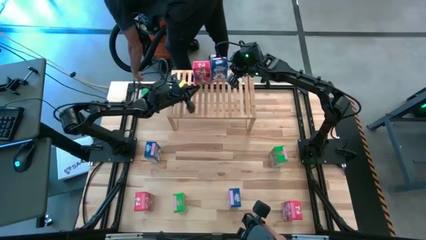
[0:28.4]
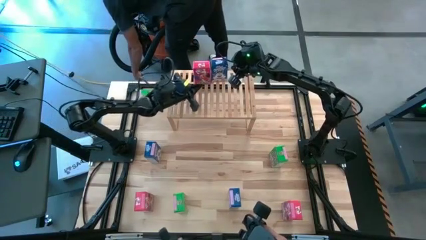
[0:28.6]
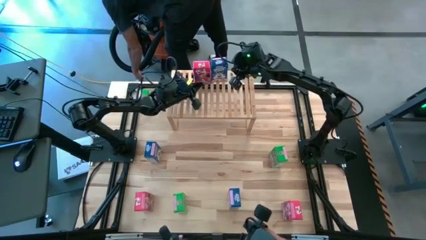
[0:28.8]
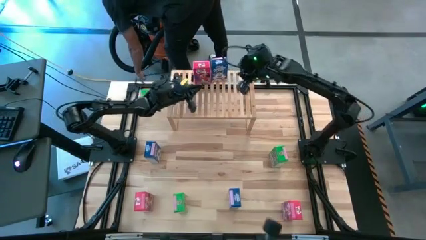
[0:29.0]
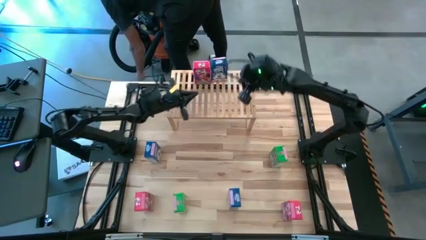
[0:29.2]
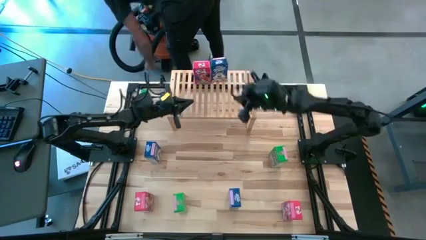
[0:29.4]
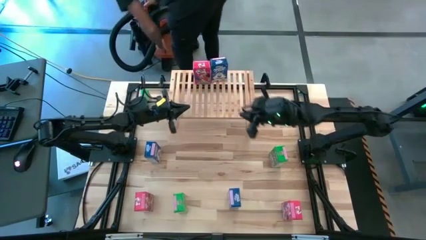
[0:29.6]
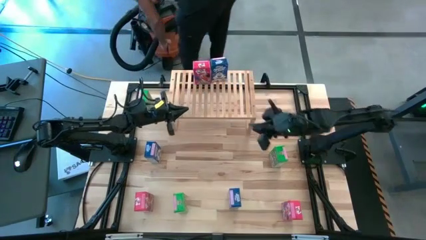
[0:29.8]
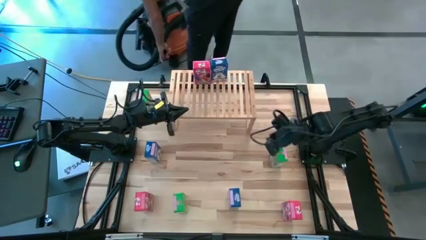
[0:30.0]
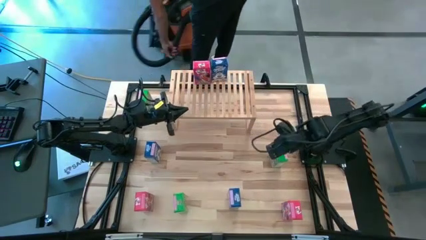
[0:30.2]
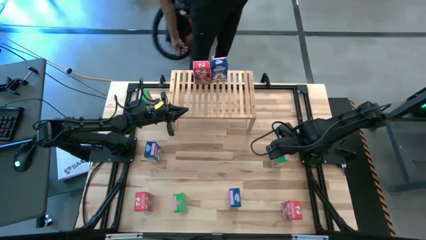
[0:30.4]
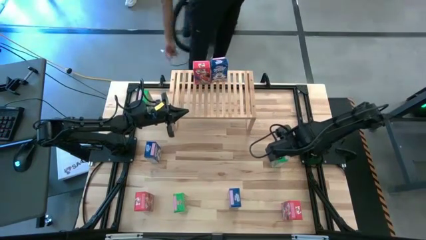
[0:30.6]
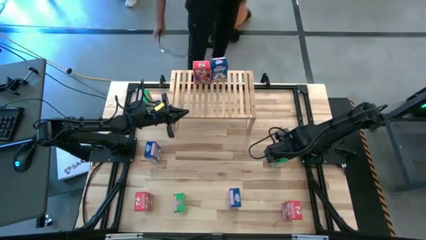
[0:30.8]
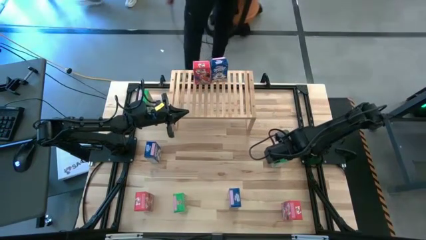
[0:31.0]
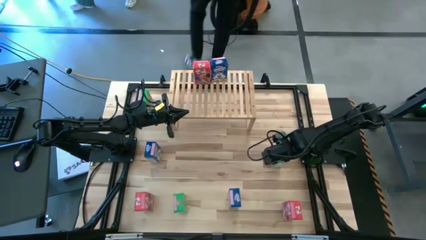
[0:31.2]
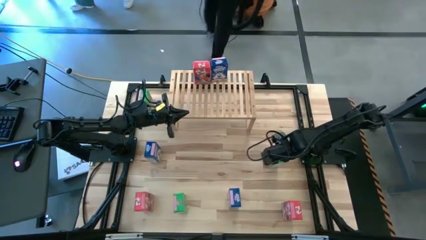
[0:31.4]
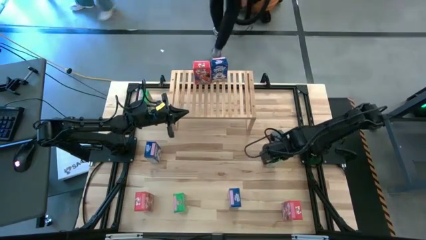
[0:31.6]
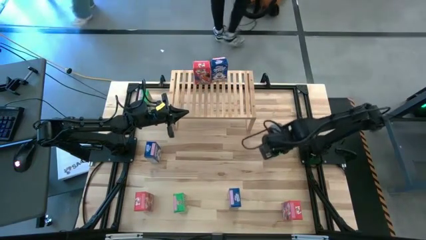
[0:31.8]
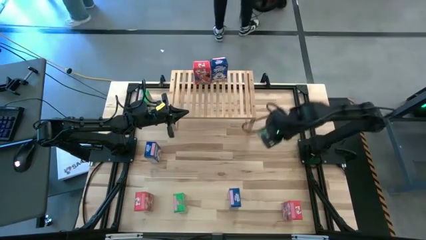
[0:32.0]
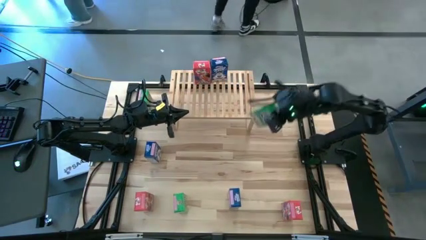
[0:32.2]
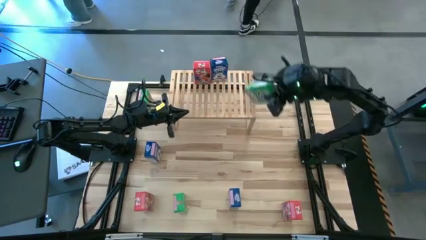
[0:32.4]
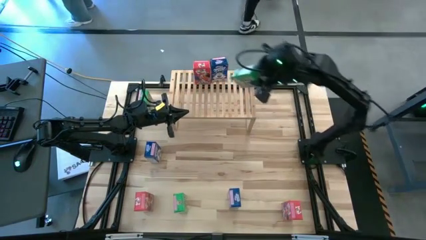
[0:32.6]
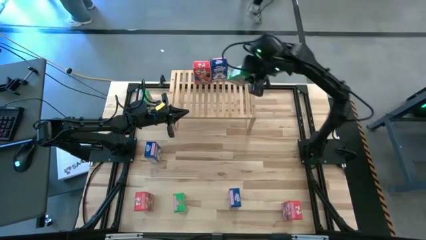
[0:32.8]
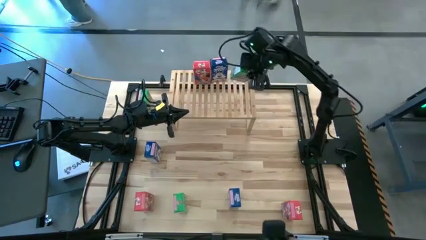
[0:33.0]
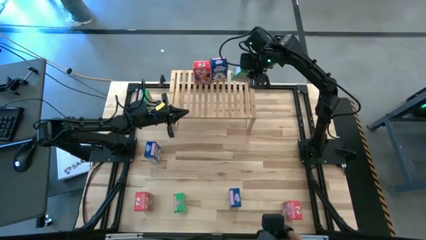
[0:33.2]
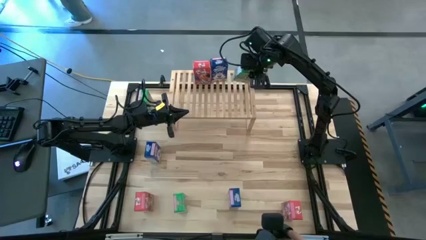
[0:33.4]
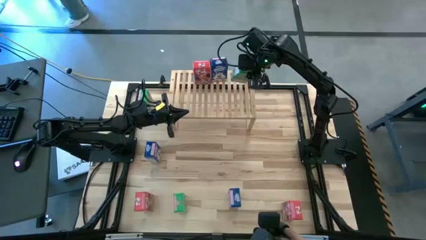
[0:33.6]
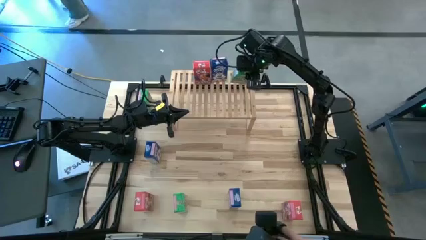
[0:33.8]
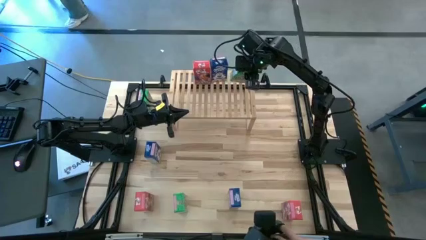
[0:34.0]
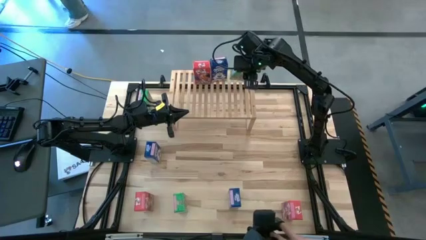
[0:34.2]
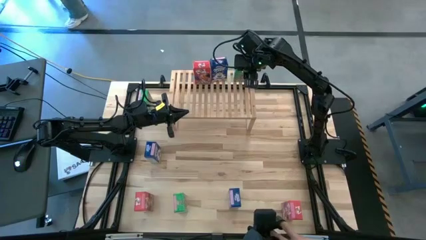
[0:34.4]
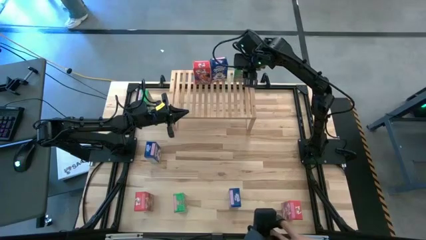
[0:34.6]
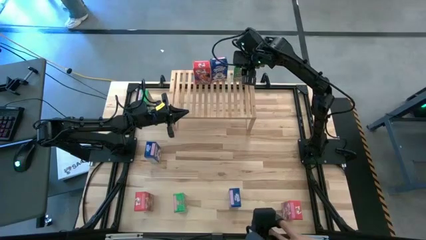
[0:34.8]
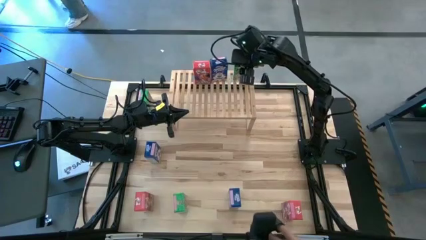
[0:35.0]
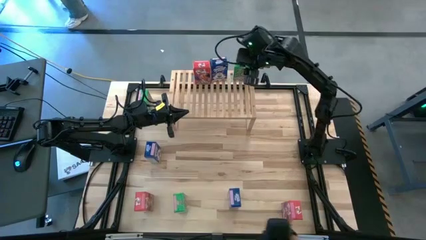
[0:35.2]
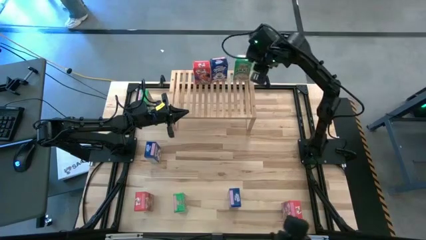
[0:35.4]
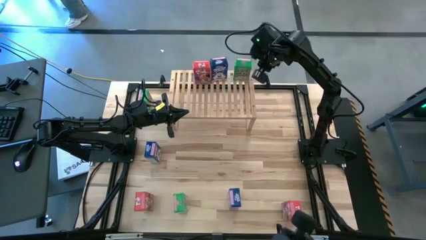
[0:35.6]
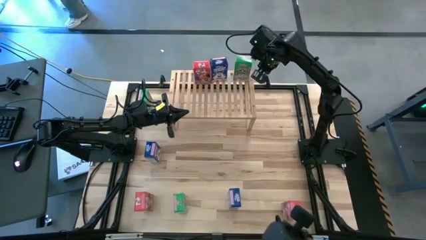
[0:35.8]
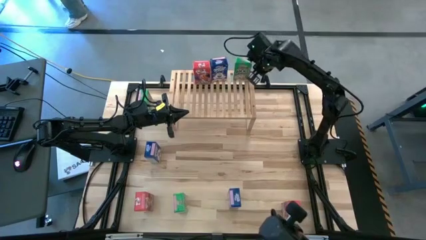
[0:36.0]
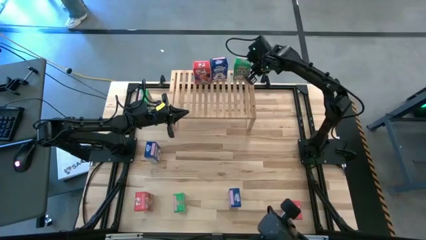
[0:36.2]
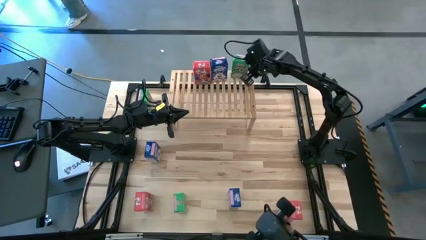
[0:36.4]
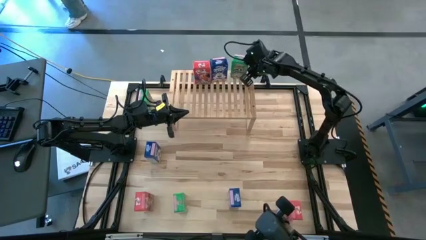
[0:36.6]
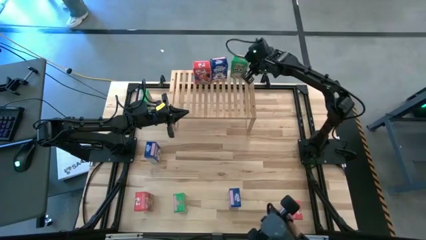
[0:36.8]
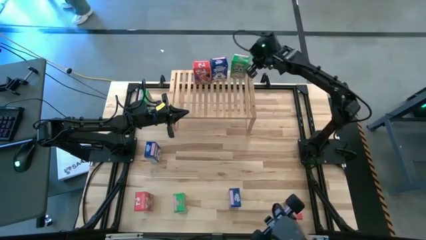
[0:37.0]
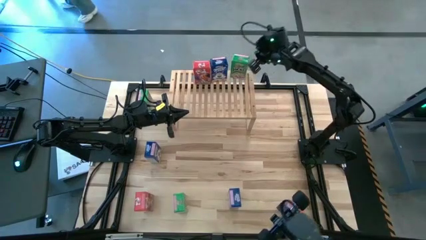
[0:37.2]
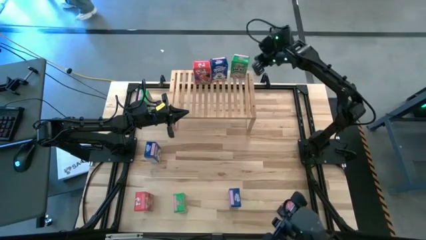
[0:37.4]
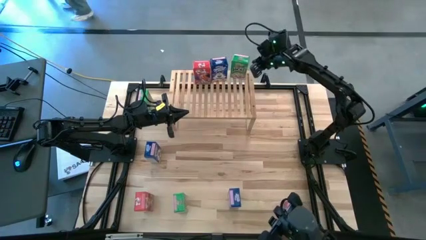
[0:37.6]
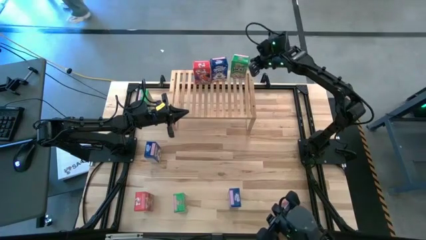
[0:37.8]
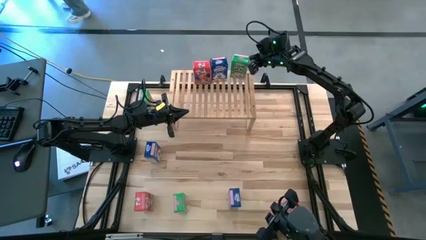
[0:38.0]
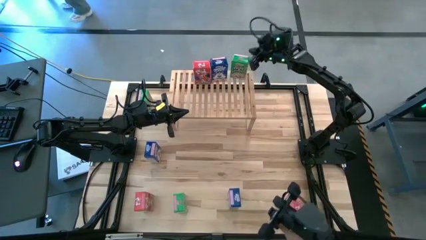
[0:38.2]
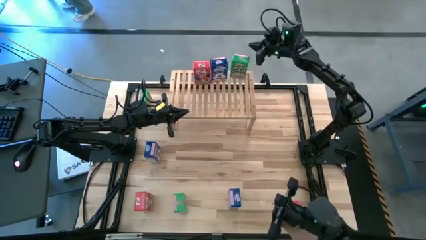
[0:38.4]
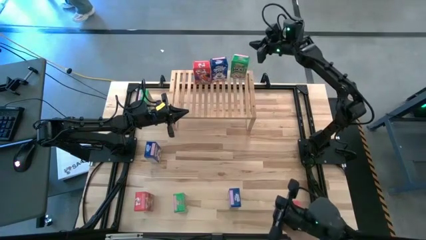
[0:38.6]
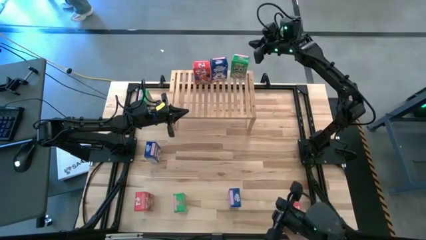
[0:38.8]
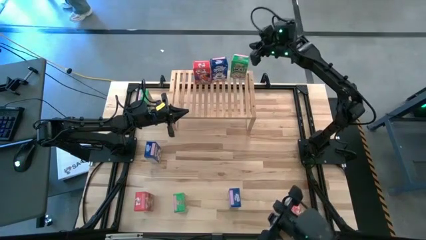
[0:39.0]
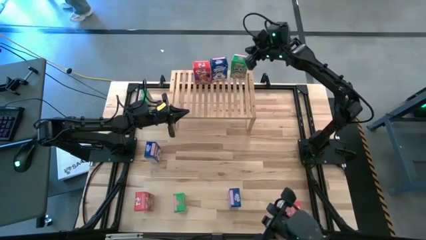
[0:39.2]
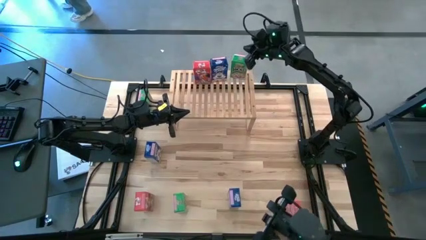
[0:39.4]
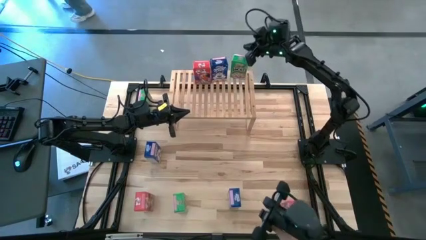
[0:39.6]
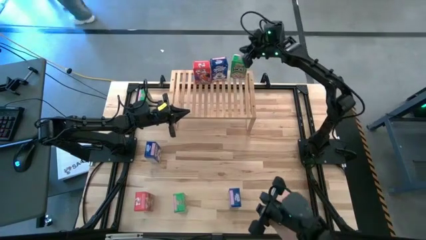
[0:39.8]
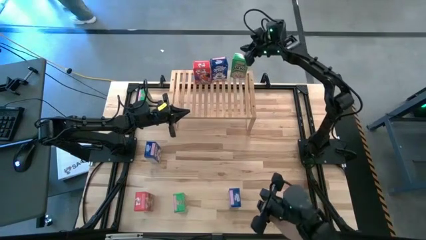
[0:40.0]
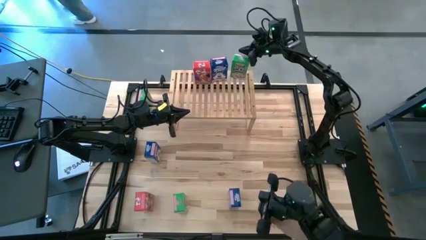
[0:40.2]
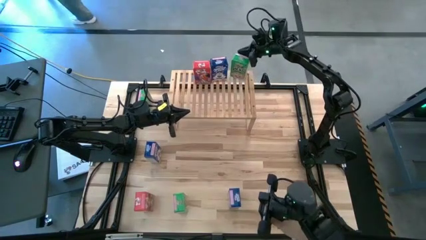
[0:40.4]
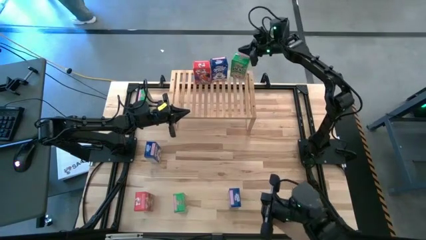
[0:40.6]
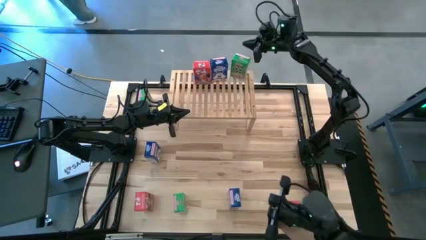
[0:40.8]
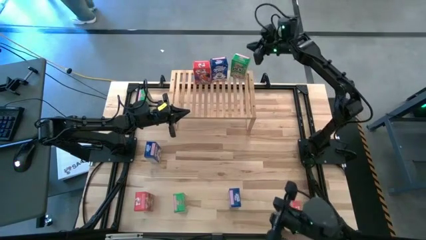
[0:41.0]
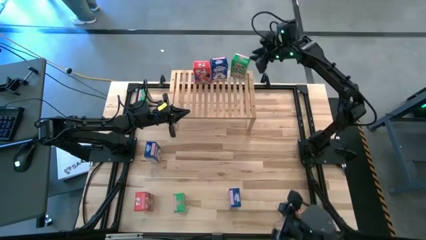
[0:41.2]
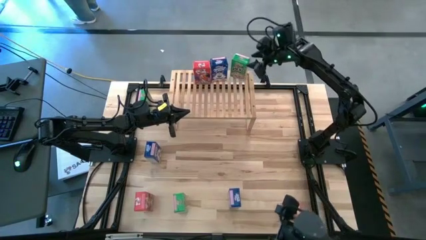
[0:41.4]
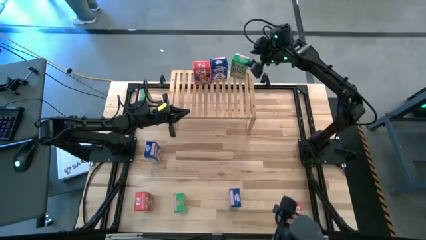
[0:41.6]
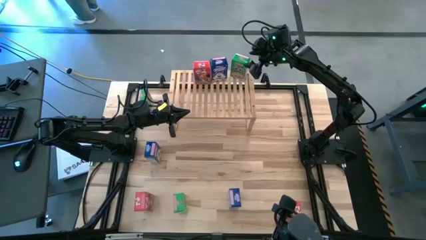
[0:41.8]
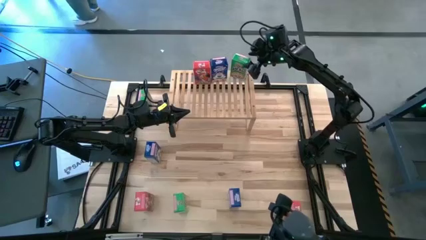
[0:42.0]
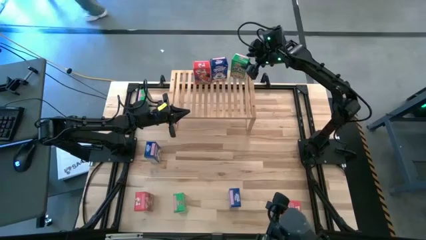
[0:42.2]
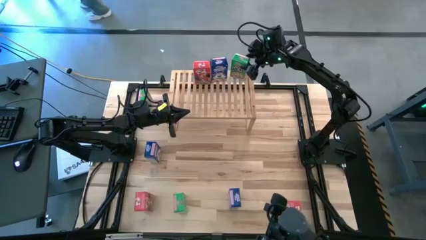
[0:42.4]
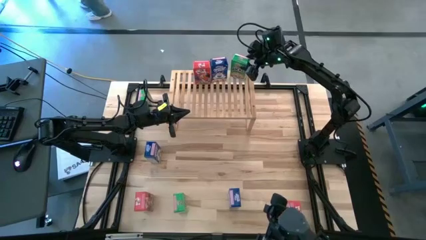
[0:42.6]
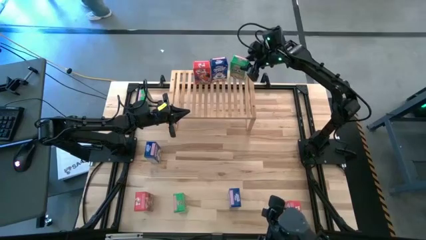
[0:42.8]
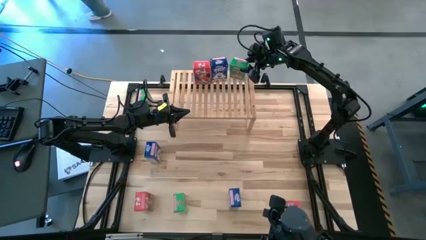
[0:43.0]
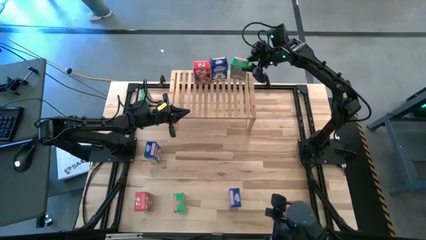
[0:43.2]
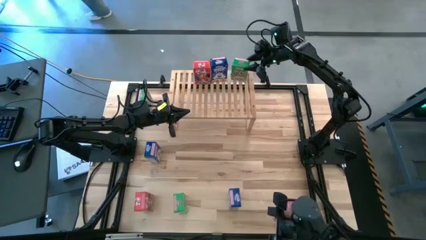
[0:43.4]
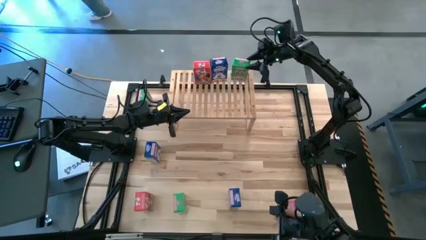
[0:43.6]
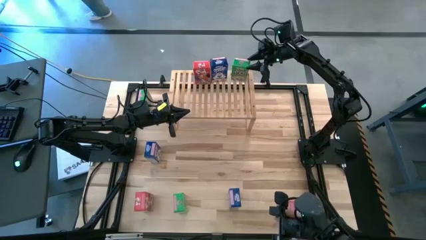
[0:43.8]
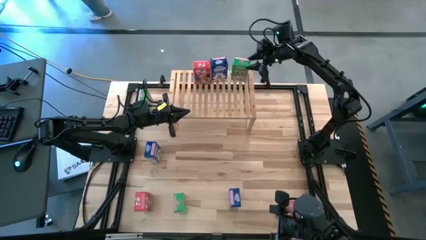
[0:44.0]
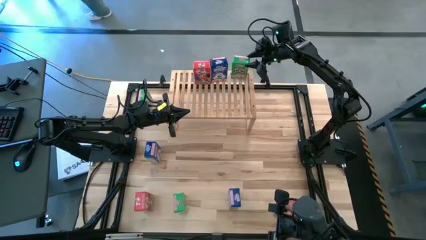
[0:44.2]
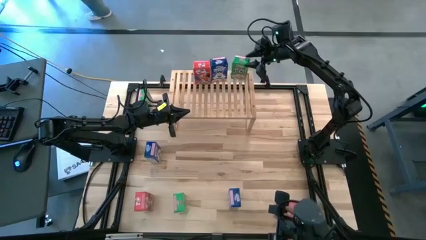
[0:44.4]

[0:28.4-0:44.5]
Task: Stack cereal on shelf
Put the middle green cereal box on the shelf
